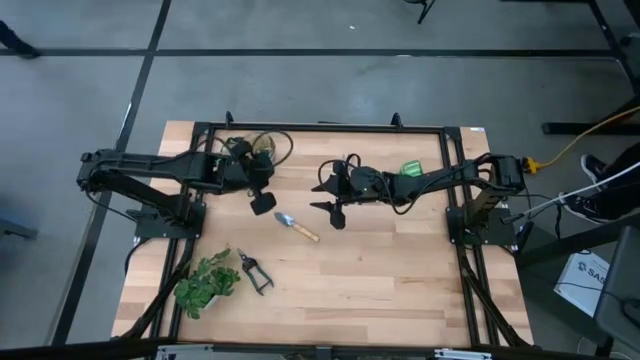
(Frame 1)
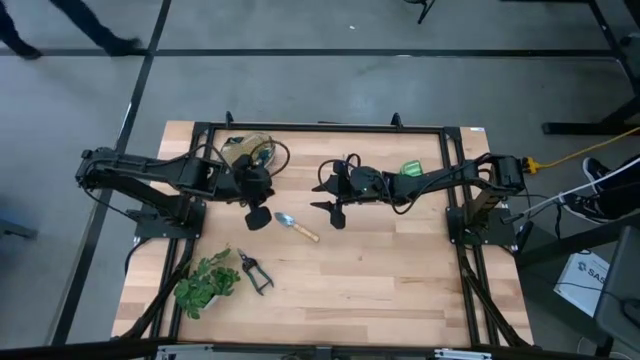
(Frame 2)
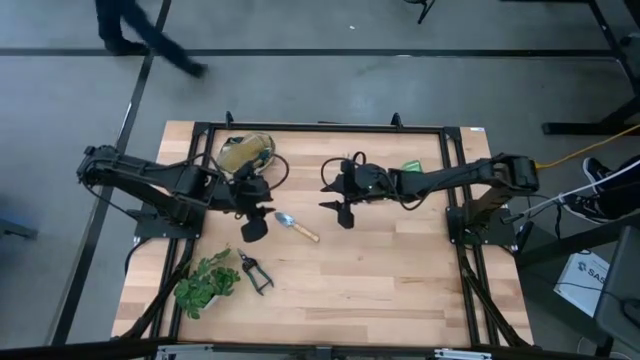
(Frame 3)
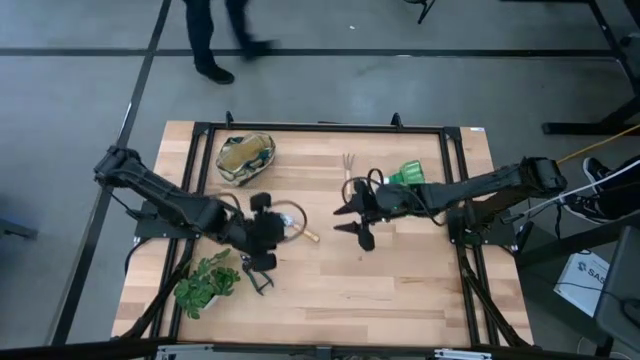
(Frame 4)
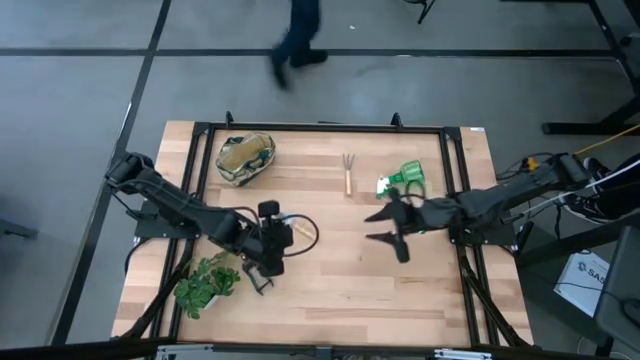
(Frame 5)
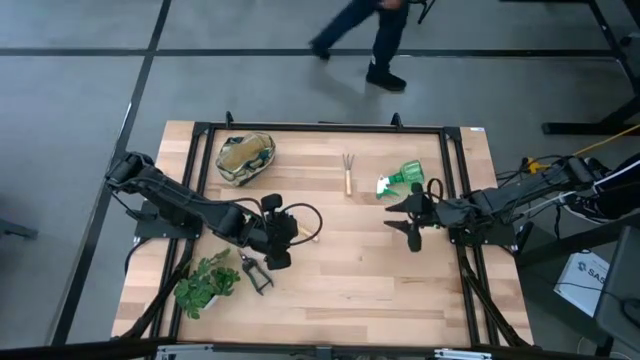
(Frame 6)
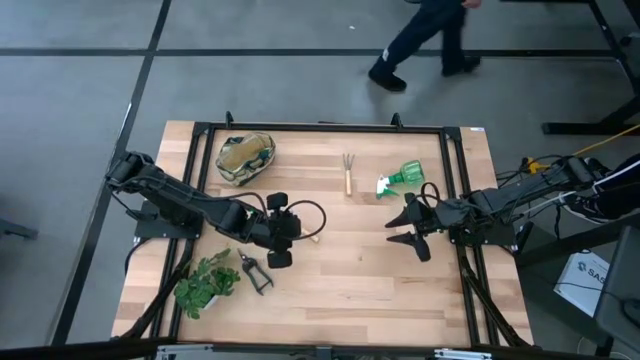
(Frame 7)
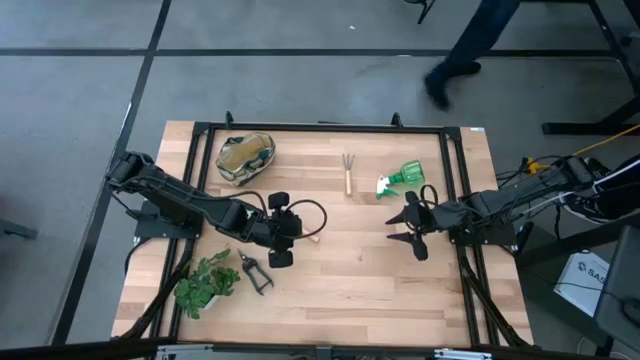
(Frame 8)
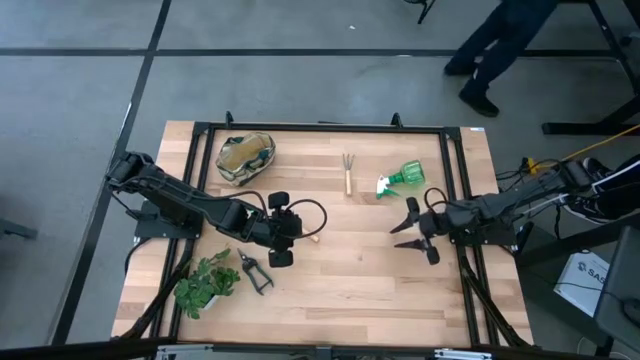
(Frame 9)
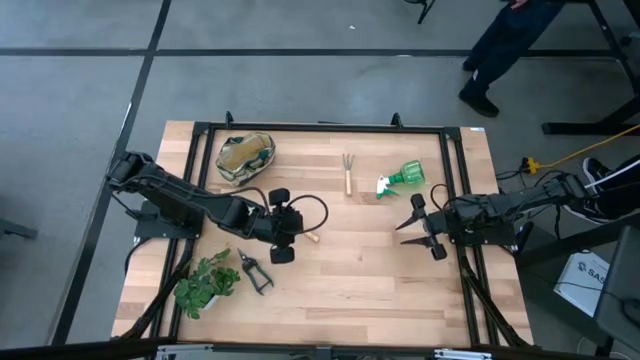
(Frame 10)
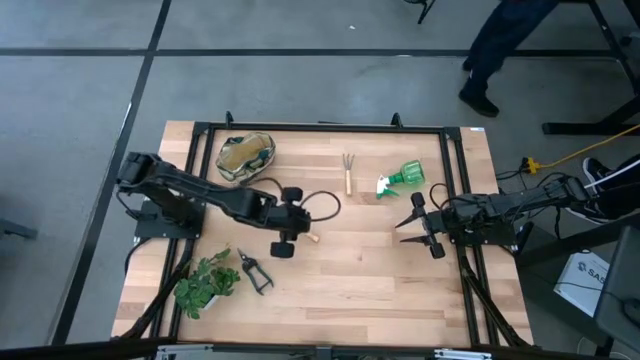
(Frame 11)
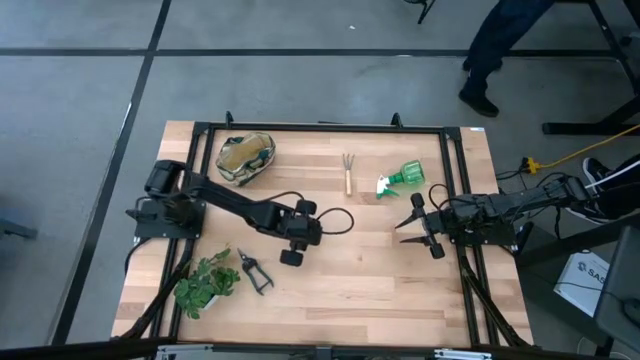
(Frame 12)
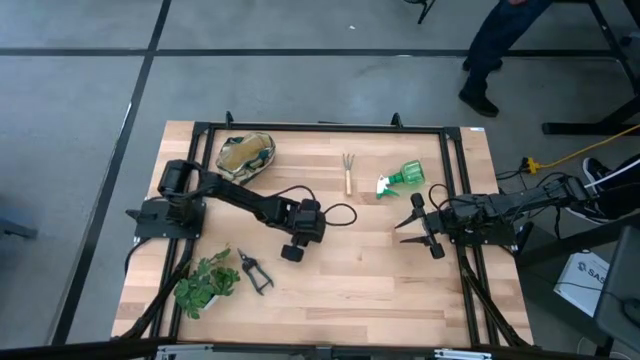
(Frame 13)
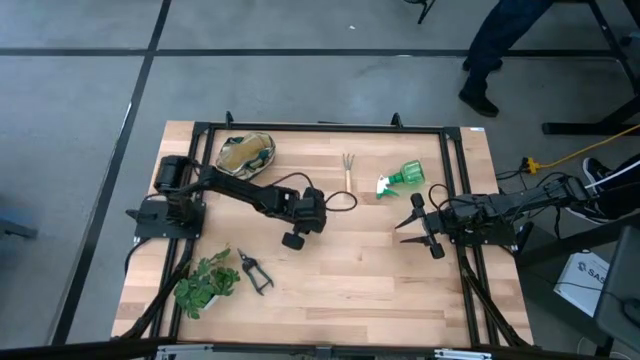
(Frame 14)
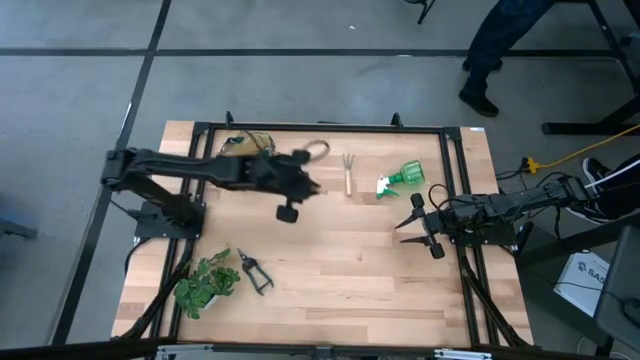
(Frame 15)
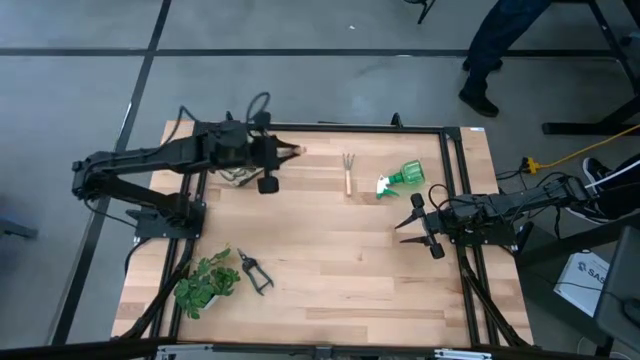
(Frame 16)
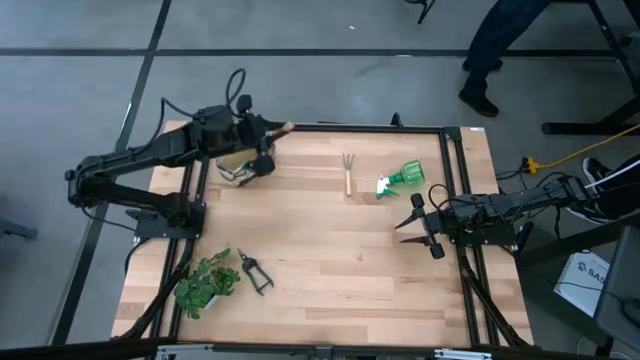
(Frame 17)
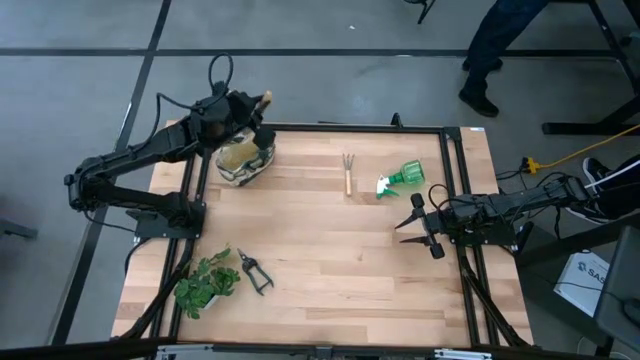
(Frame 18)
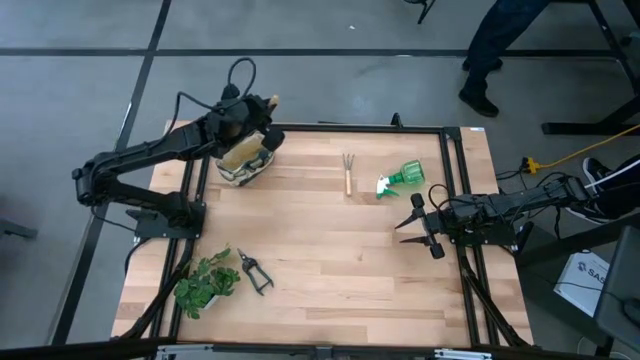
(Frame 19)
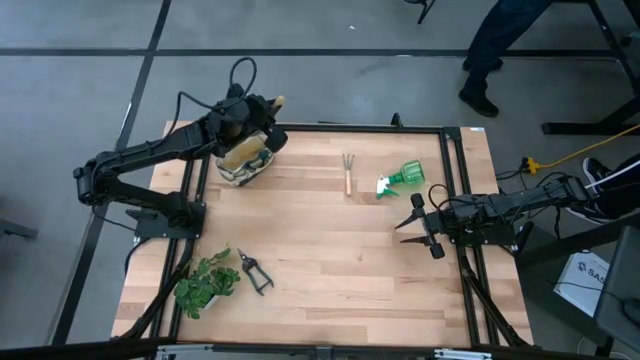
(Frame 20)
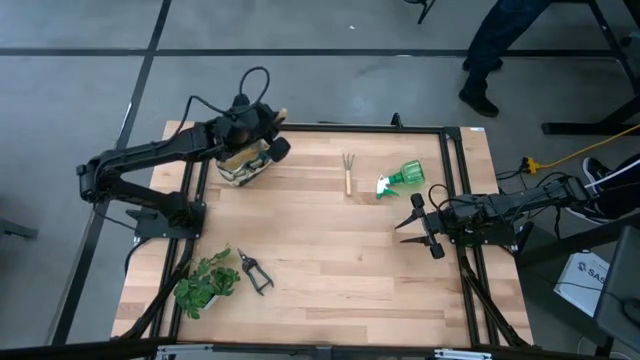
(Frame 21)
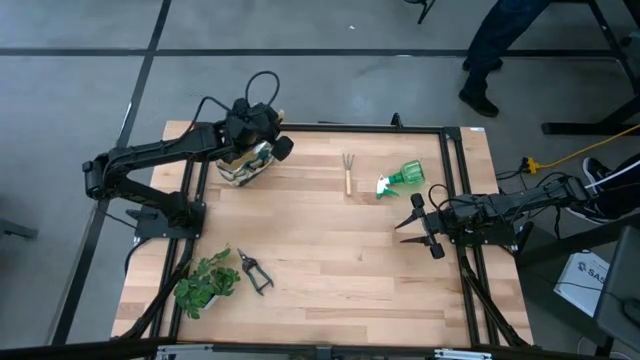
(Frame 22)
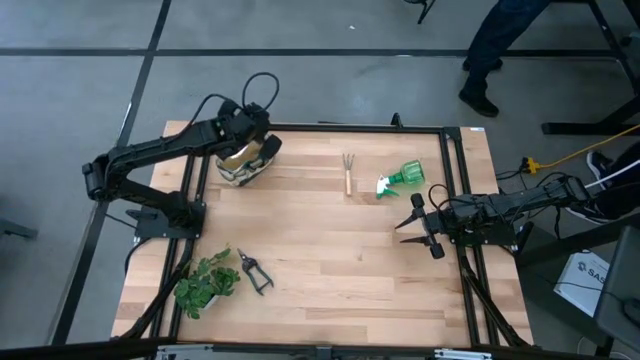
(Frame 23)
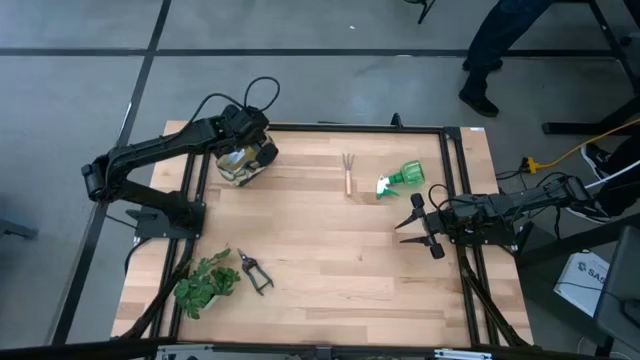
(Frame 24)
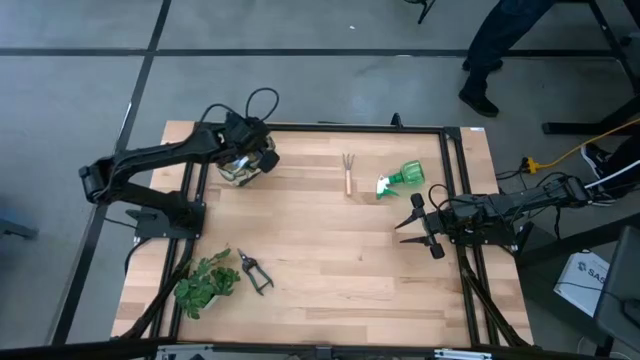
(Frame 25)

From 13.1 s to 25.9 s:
Task: Pick & Place Garden tools in Gardening bag
Put the trowel into the gardening bag

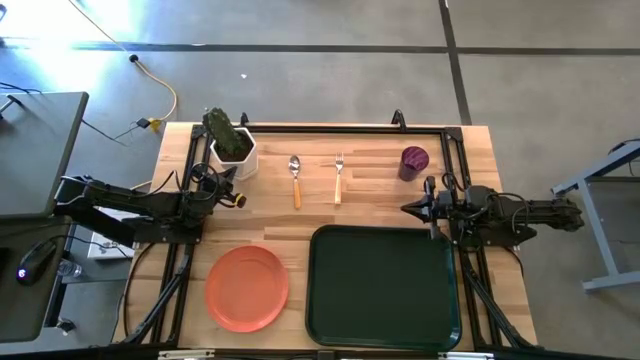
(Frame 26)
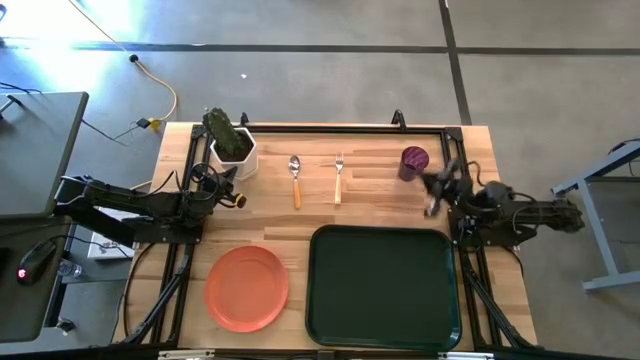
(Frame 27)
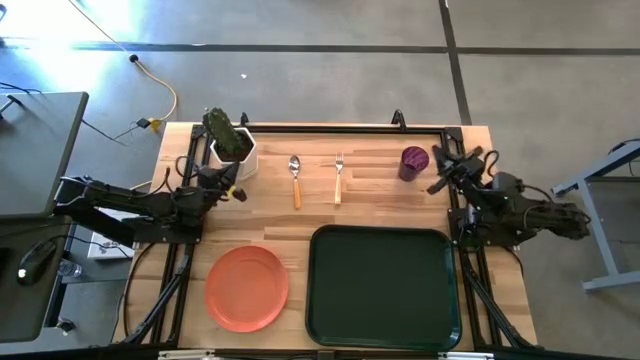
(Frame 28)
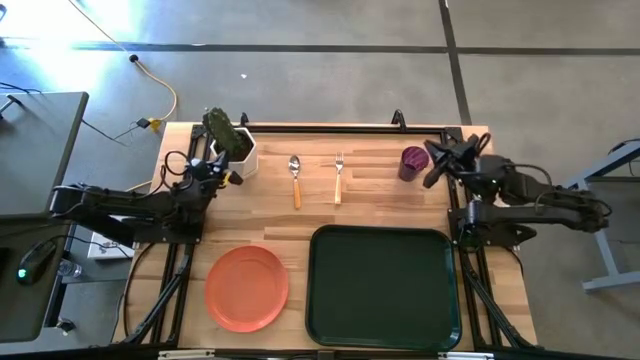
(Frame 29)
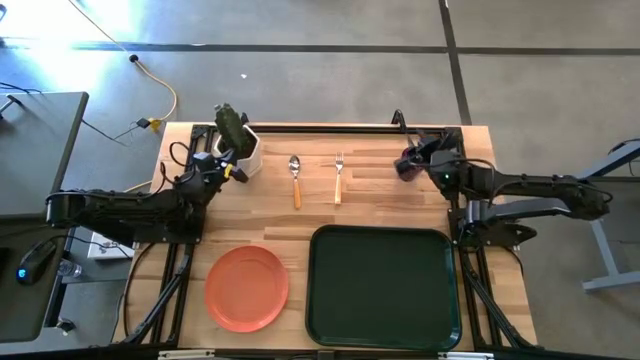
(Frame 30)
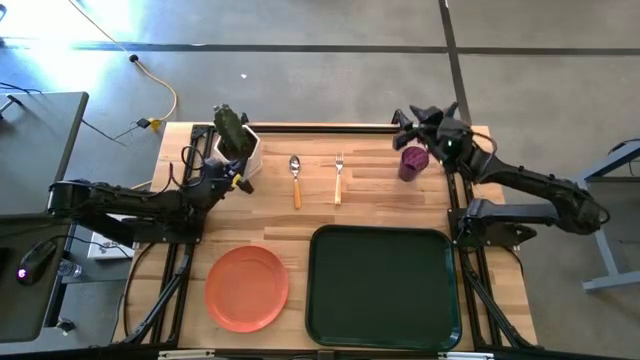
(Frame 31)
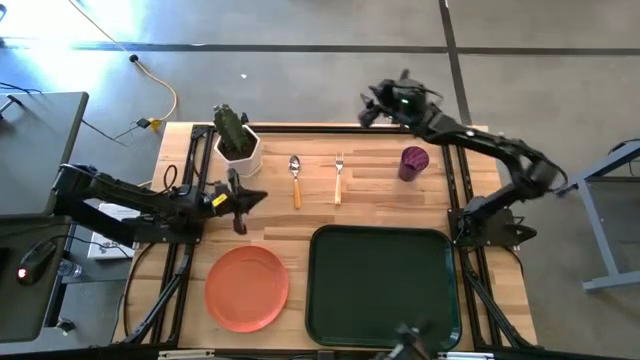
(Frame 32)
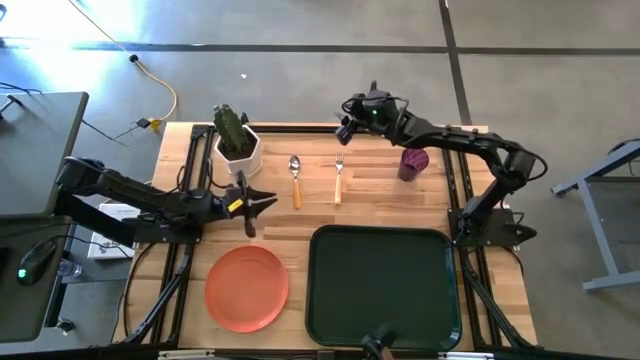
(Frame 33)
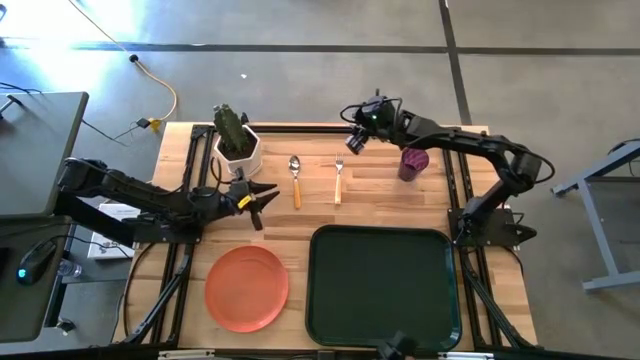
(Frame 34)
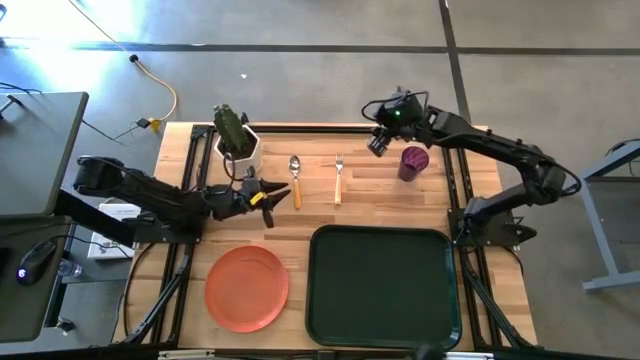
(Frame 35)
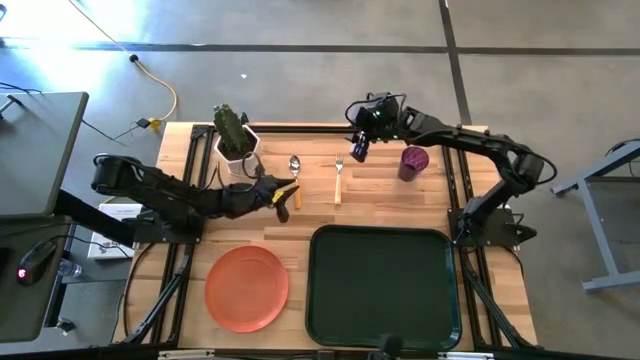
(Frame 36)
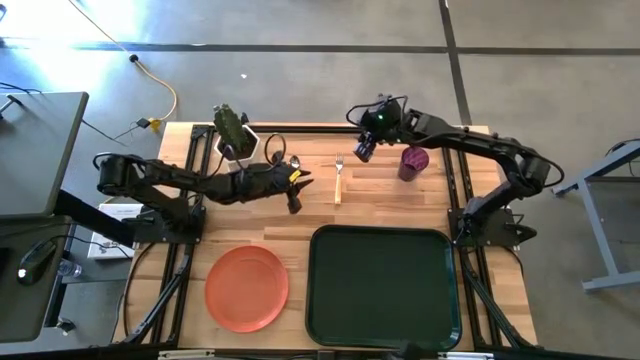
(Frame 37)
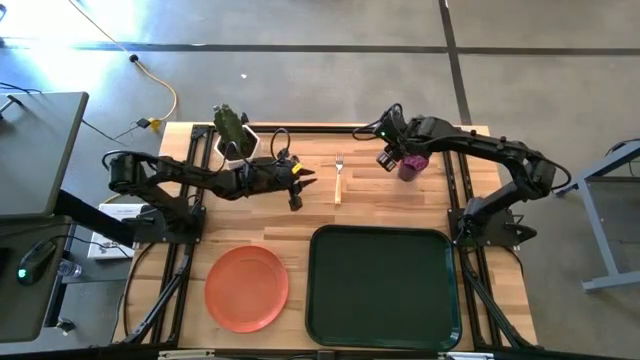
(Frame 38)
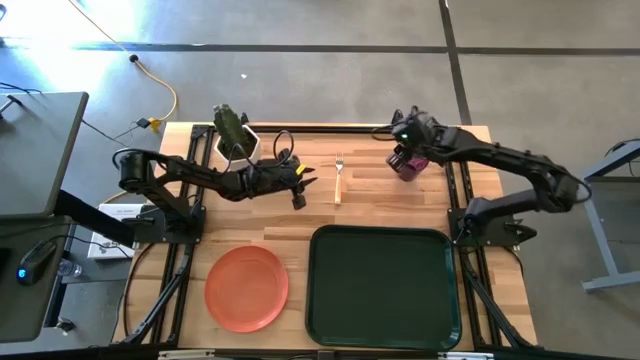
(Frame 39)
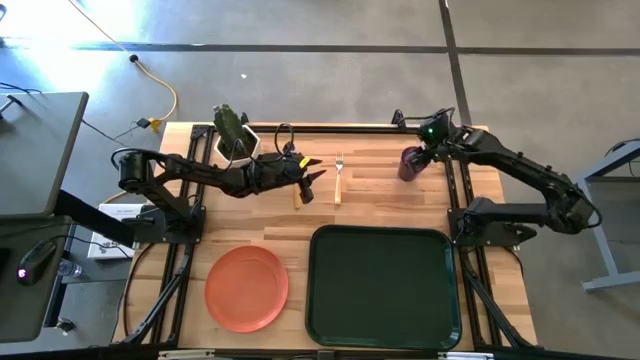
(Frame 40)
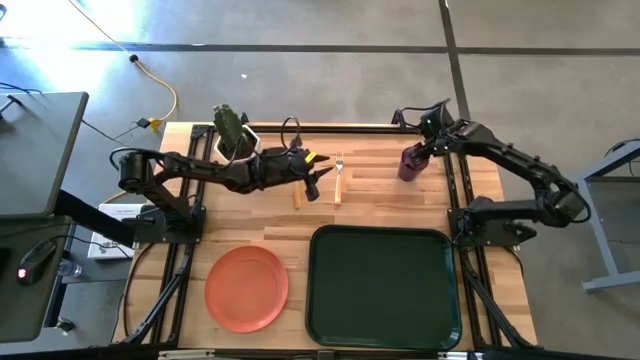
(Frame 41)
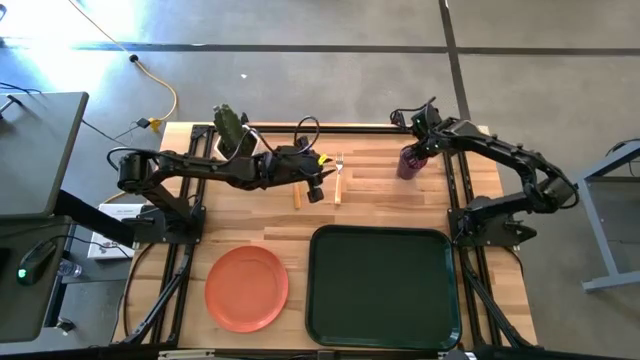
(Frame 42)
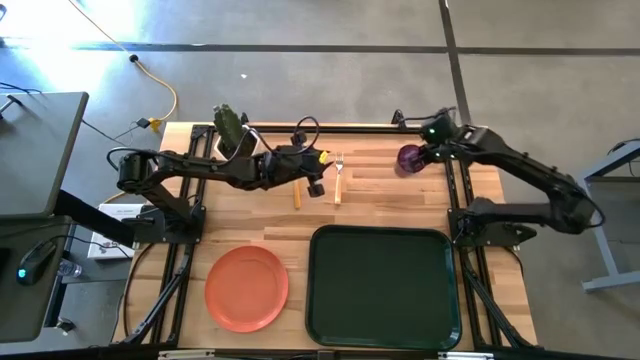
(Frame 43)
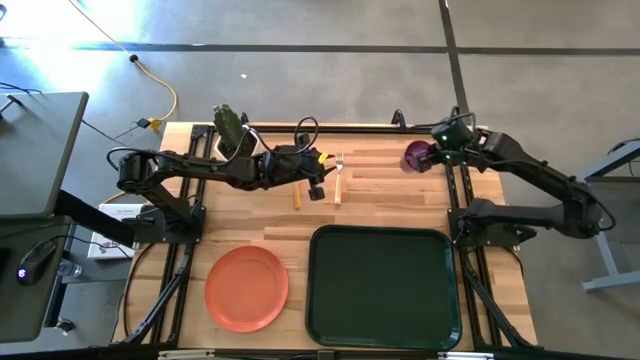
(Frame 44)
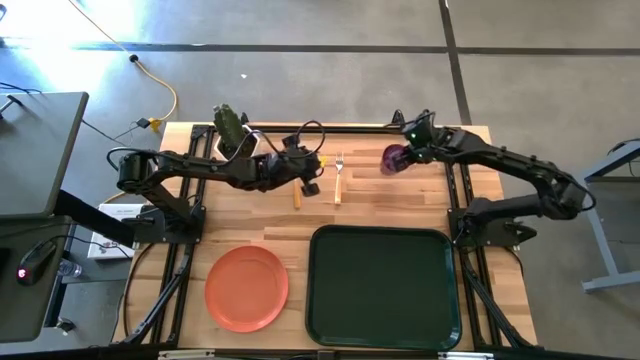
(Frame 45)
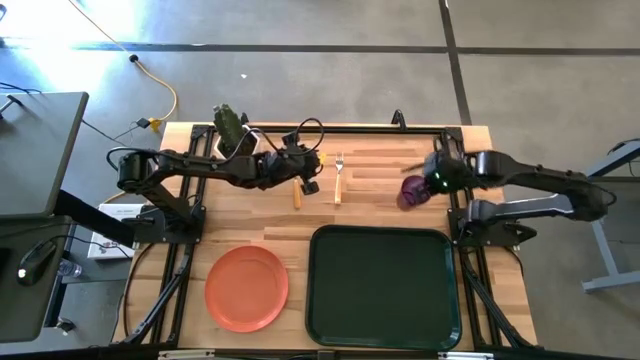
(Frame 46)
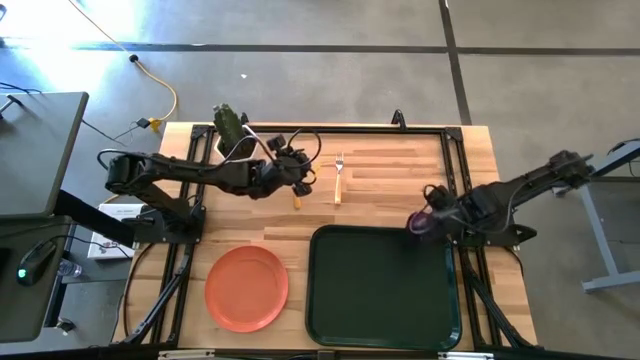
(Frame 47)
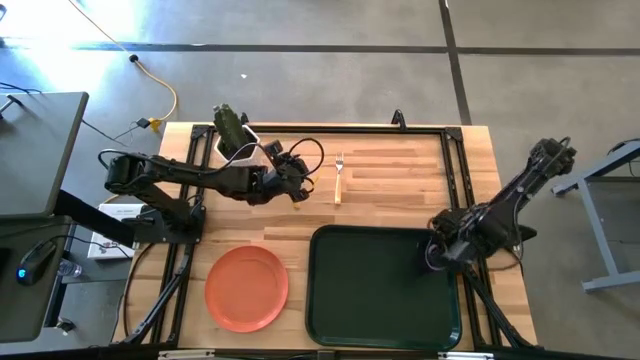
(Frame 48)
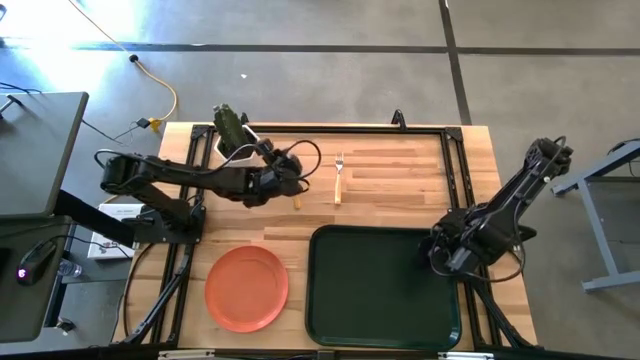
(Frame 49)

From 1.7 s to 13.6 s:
Task: Pick and place plate/cup/fork/spoon on tray
Put the purple glass on the top right of the black serving tray
